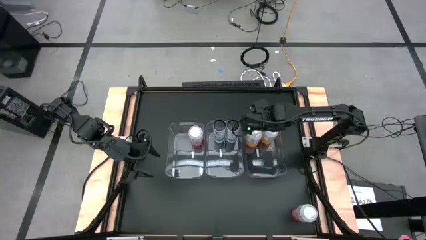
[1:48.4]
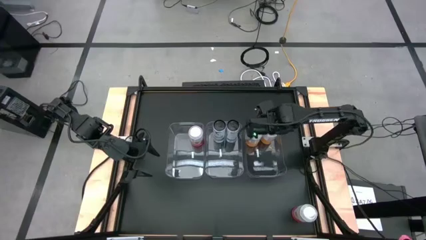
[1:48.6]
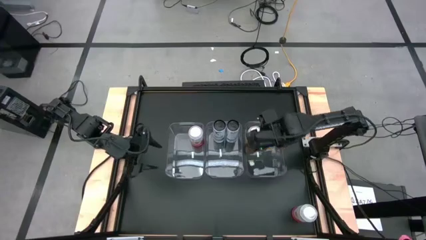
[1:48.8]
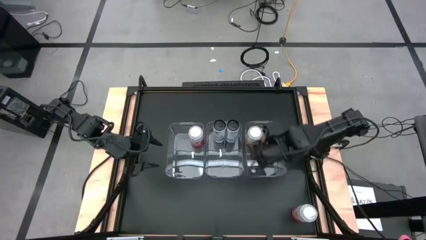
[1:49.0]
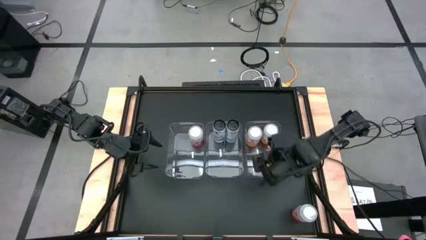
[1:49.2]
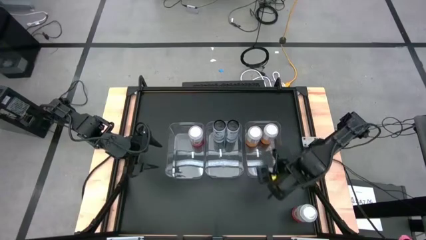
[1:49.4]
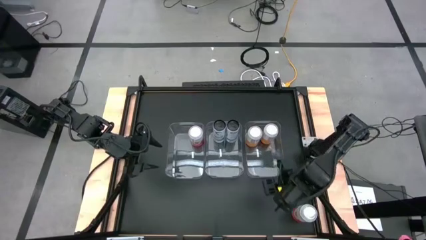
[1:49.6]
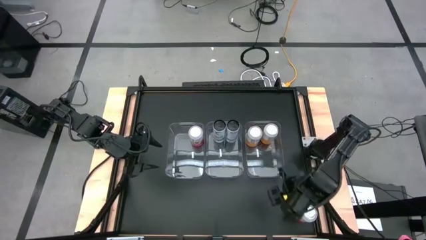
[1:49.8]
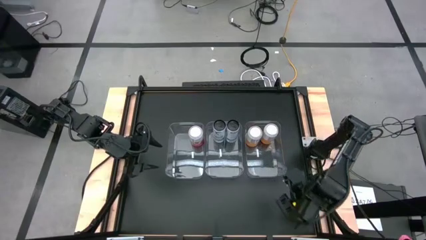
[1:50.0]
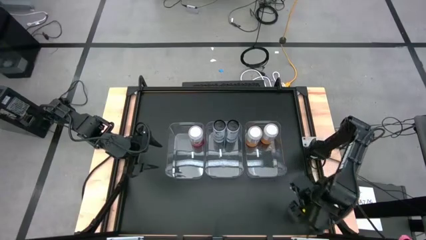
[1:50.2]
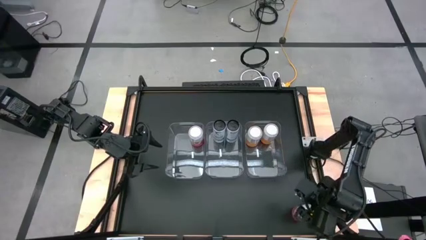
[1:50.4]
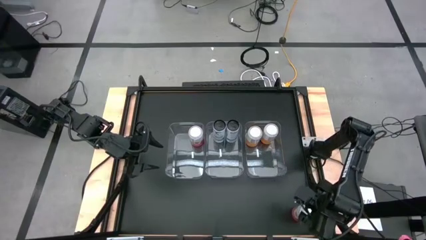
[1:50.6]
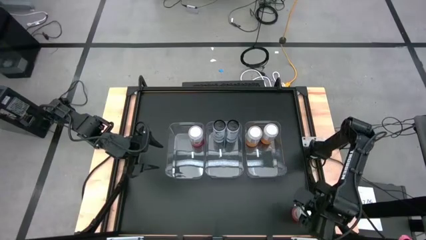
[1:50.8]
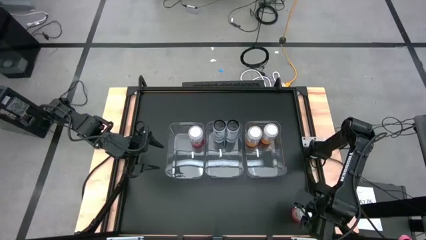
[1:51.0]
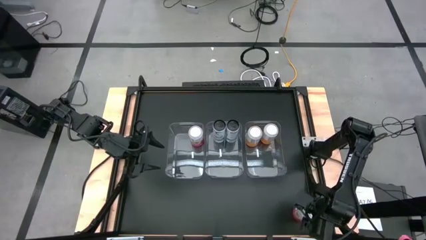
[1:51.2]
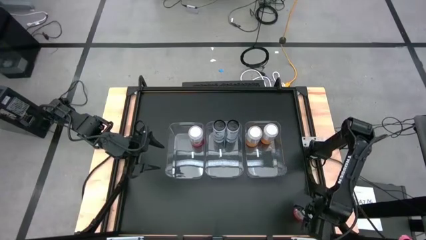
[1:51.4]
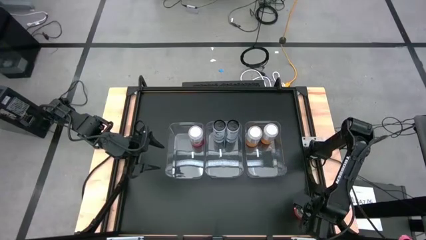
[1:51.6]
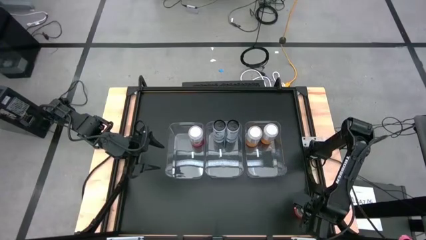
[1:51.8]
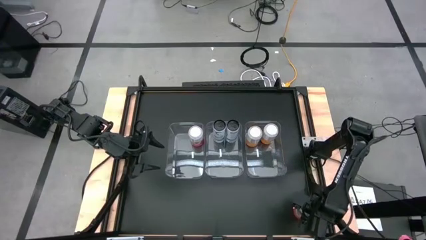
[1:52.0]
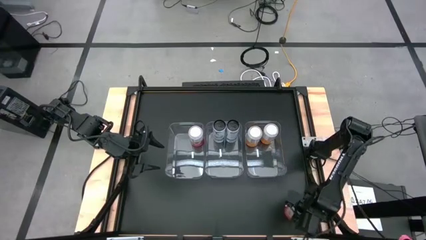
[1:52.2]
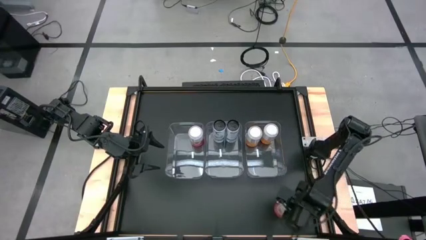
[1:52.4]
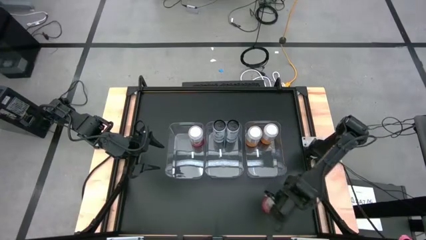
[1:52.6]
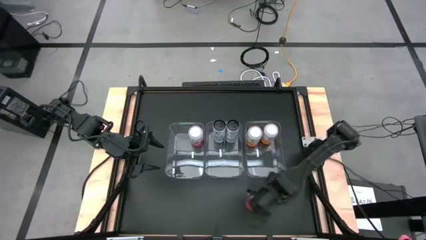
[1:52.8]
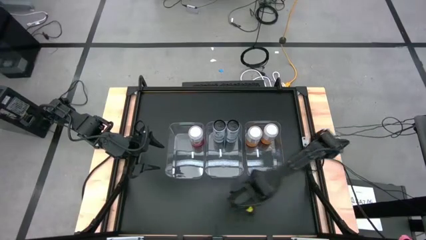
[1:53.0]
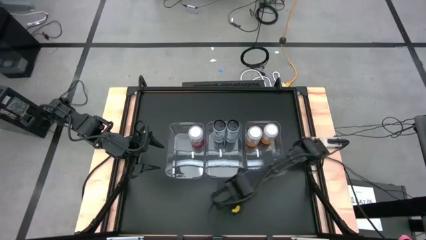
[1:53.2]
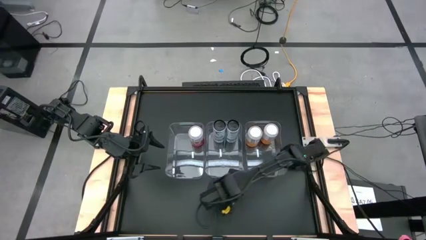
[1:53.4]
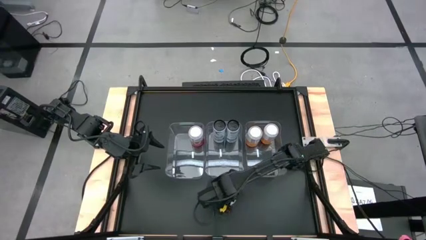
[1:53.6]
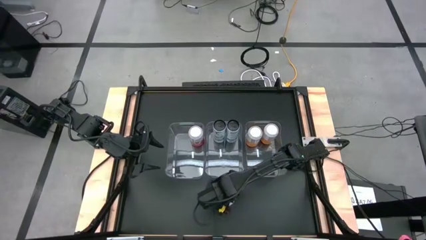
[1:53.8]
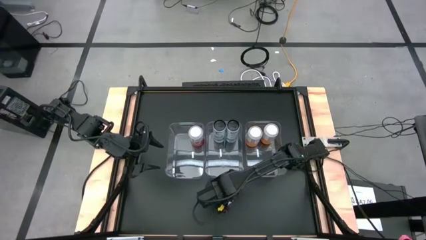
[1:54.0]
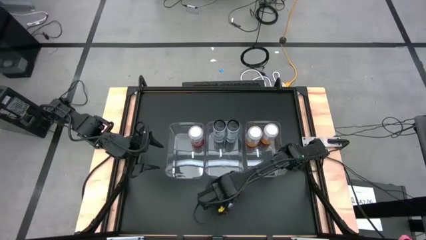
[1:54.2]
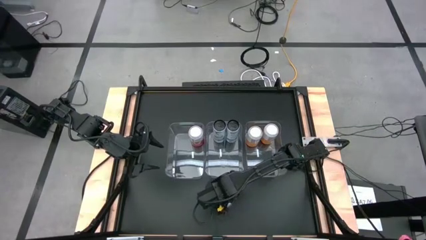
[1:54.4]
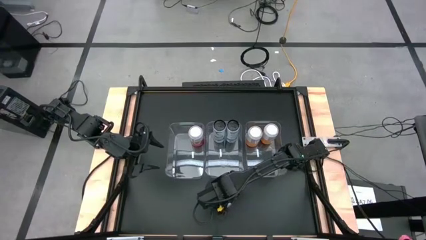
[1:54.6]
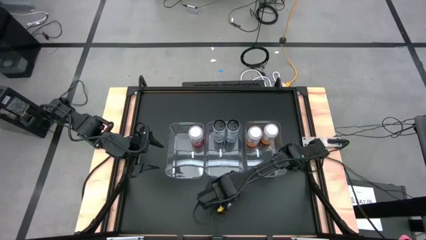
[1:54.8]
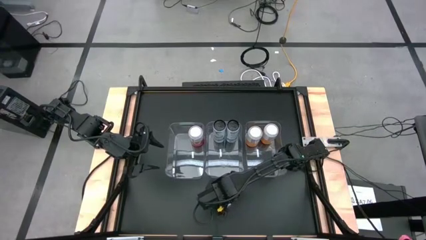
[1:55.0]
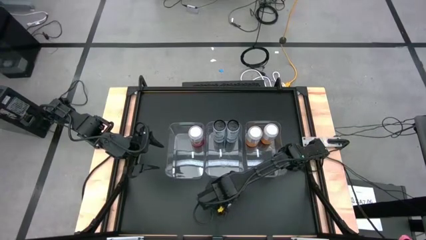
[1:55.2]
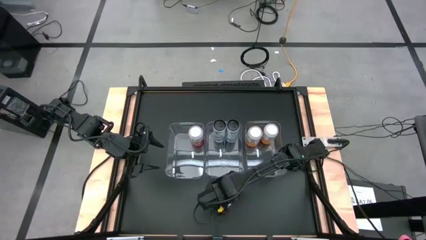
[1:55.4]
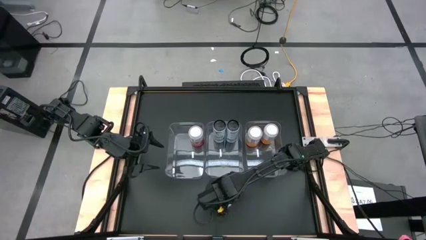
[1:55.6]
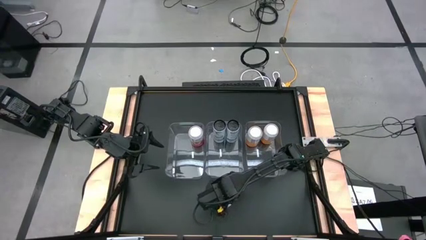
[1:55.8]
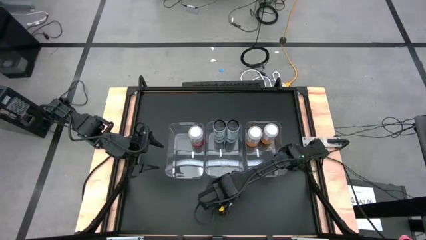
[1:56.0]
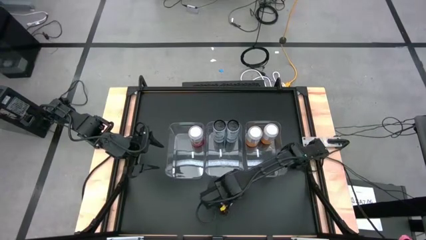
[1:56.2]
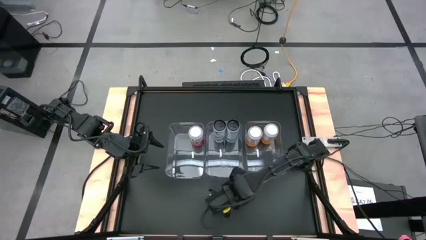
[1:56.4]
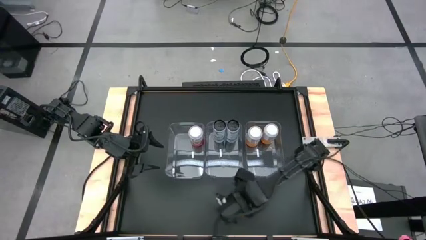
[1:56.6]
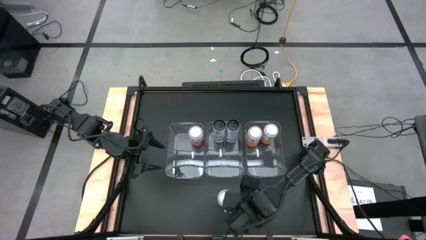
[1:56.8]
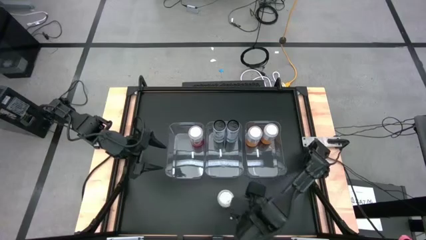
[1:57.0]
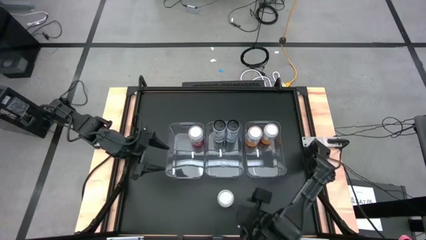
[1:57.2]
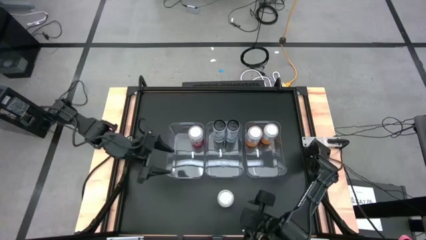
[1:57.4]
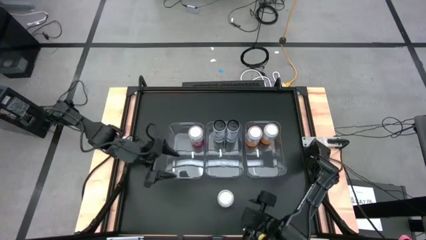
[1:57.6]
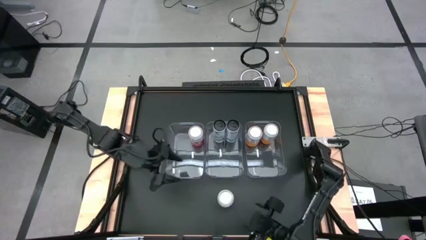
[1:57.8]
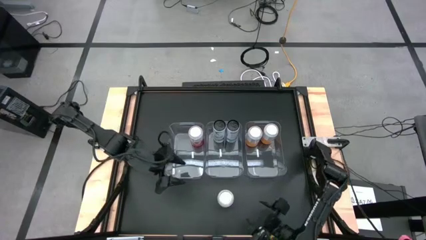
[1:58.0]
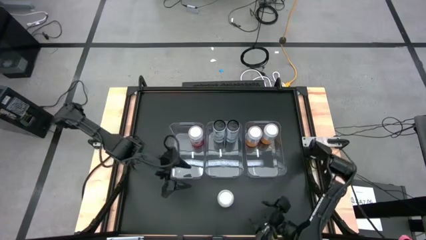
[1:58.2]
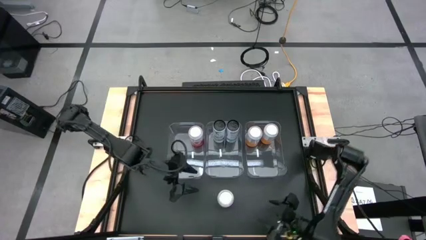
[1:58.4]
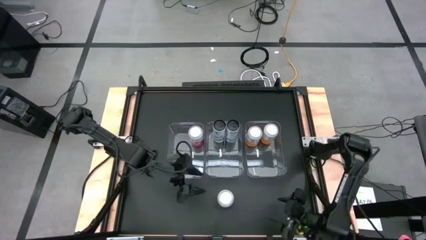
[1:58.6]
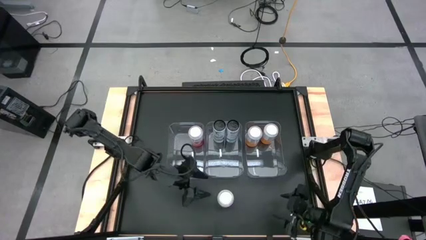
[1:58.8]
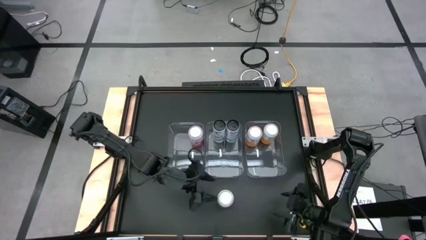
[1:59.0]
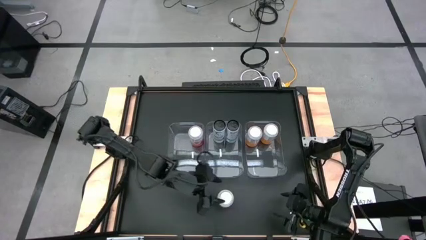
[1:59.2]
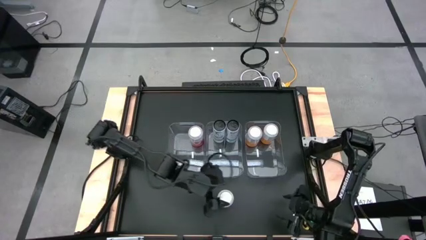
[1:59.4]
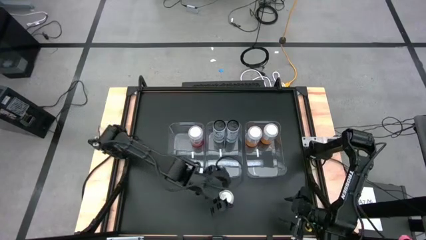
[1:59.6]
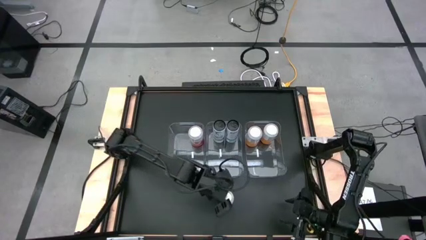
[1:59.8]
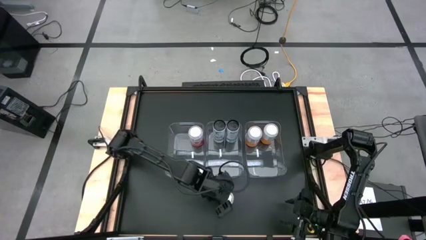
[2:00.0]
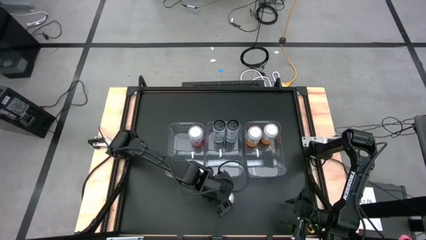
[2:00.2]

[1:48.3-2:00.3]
Task: Sort soda cans
Put the pink-white soda can into the left transparent bin

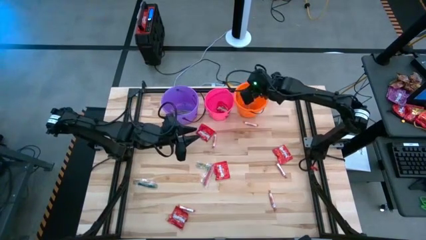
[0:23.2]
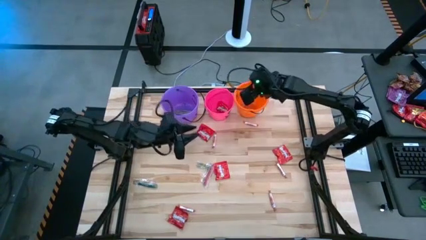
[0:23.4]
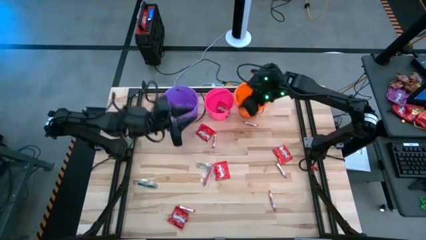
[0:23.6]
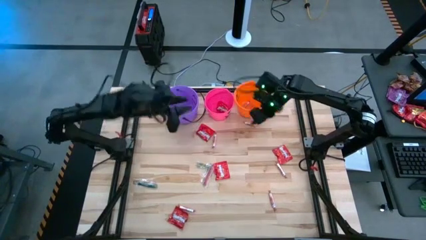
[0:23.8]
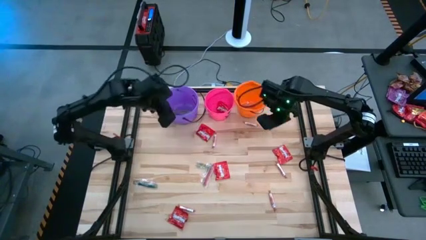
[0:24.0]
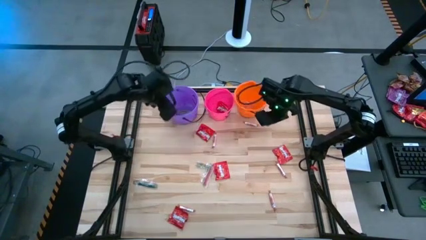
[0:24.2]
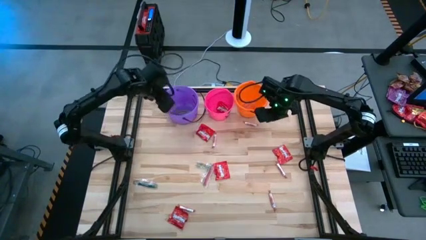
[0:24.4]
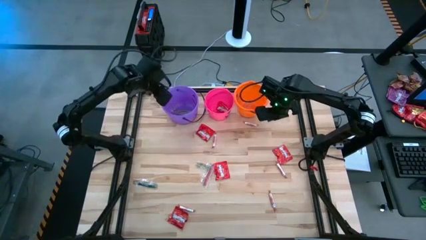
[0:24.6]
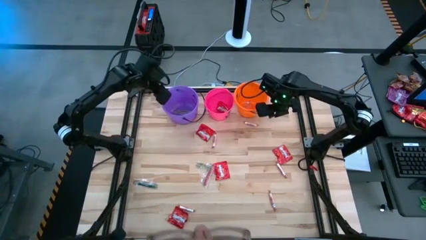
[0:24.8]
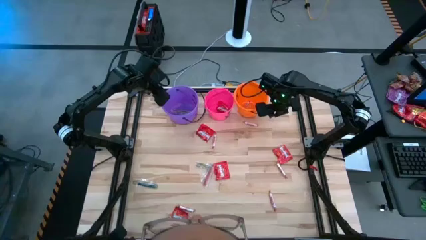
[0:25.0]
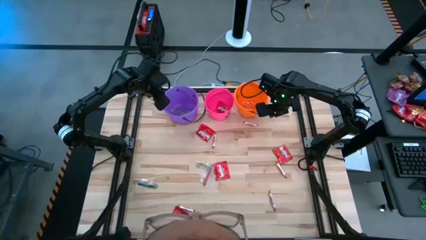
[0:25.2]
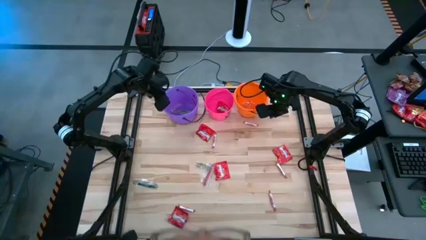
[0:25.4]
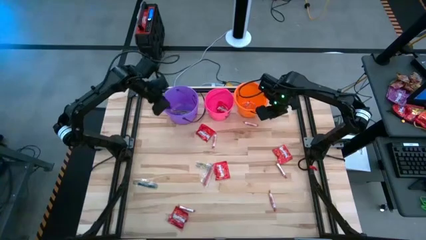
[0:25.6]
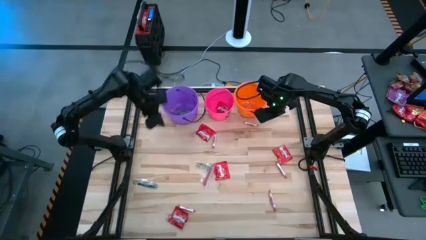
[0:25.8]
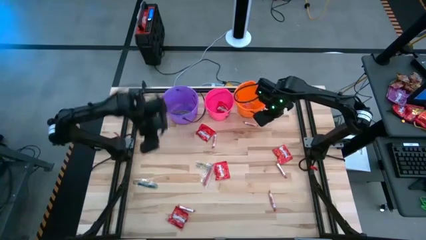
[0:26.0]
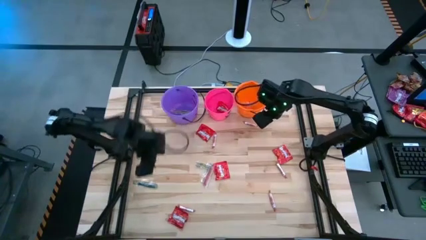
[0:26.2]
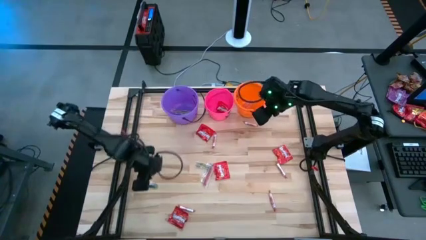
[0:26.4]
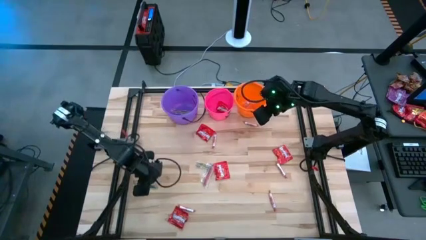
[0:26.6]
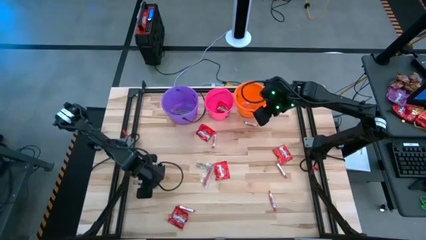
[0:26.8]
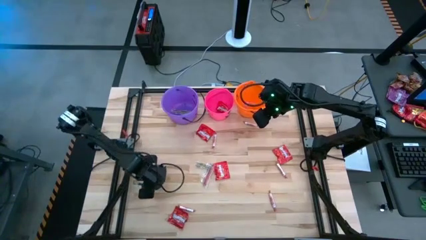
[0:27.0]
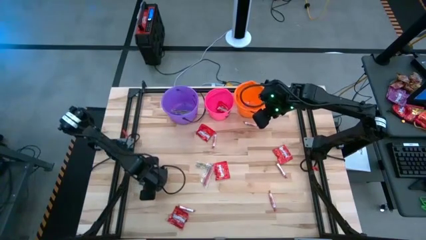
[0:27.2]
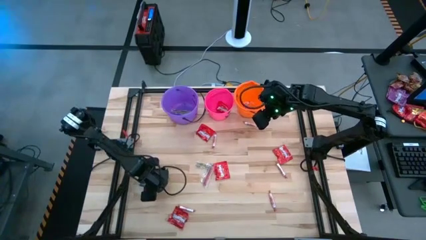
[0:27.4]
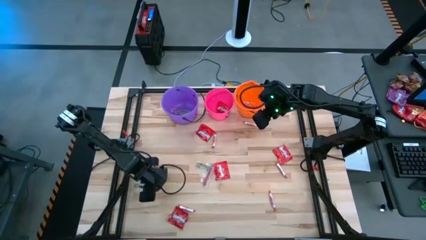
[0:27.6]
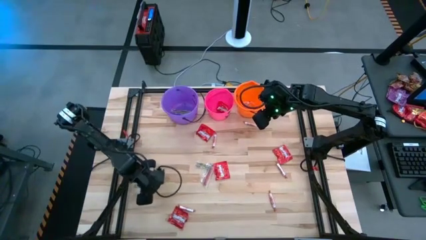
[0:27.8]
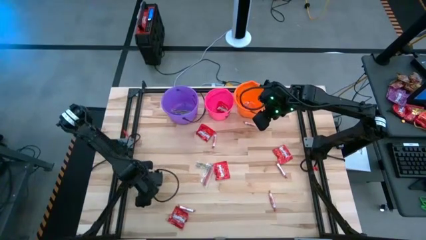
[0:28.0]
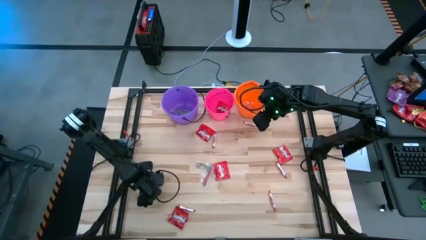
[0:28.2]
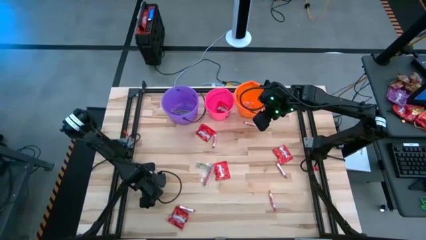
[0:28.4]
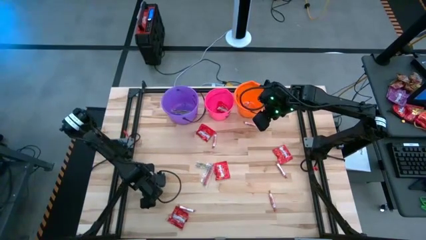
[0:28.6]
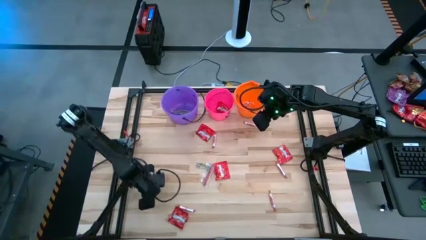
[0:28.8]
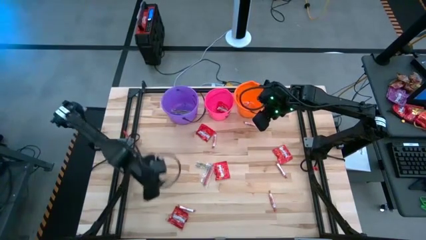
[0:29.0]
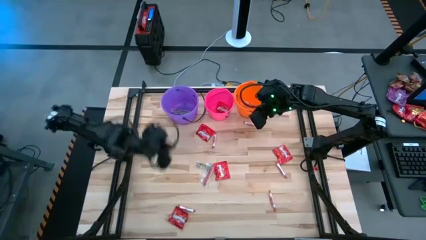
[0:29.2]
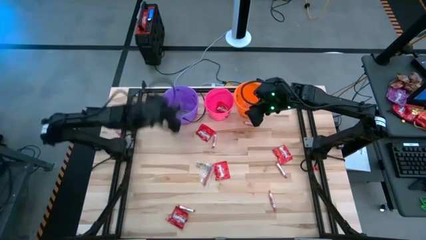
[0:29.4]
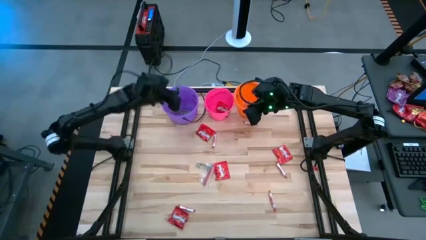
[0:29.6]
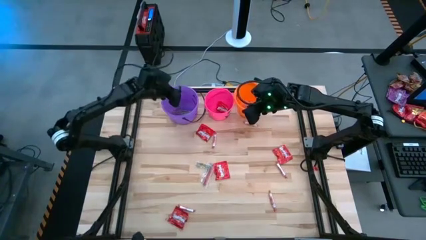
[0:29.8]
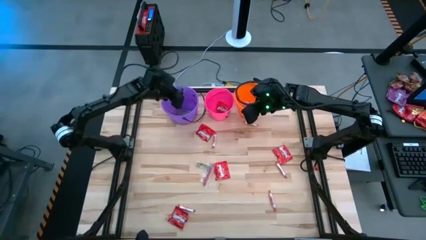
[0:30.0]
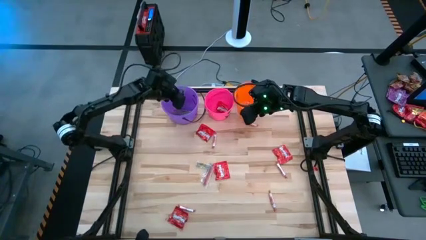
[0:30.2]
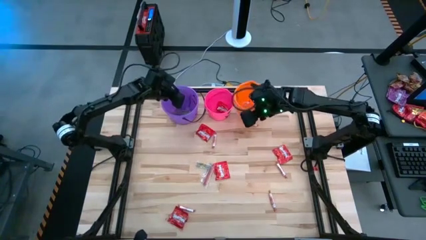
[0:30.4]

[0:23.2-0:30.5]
Task: Sort candy by brand, put in halloween buckets
Put the blue candy into the purple bucket
